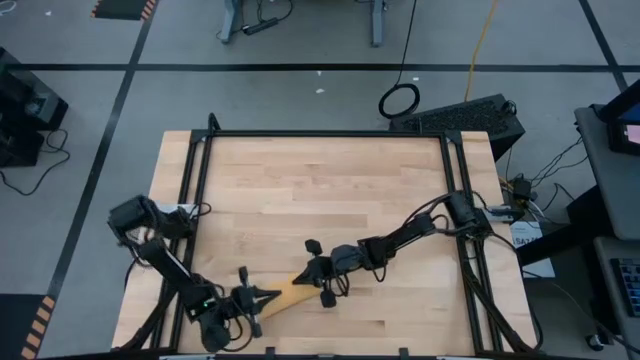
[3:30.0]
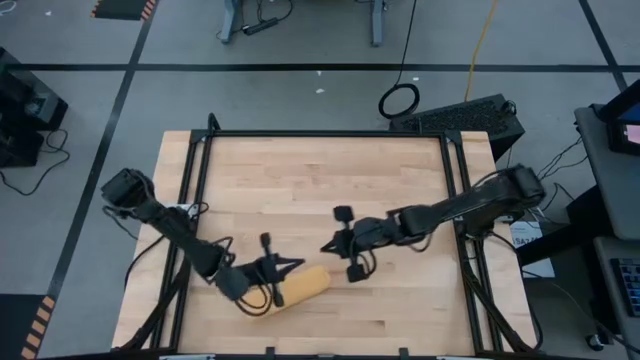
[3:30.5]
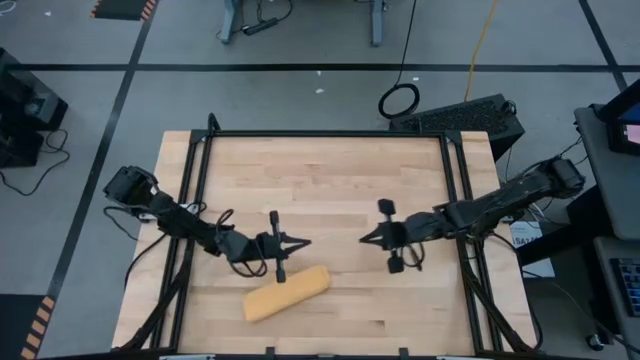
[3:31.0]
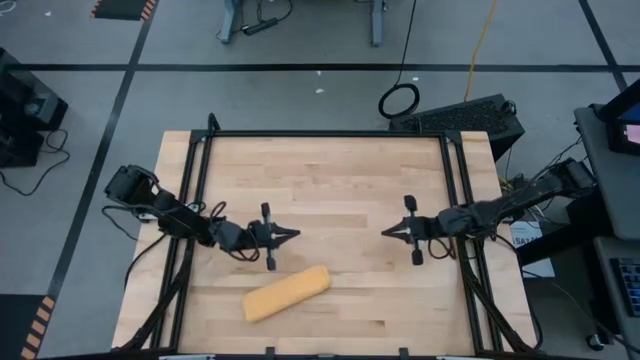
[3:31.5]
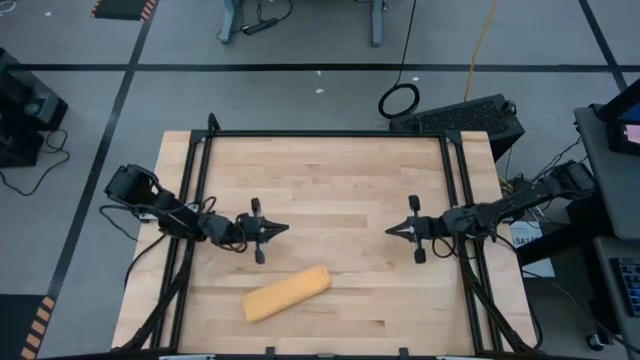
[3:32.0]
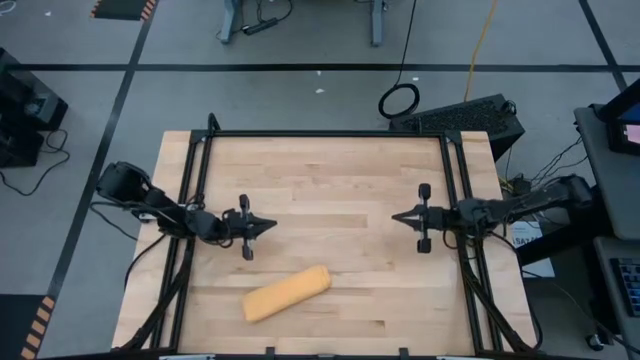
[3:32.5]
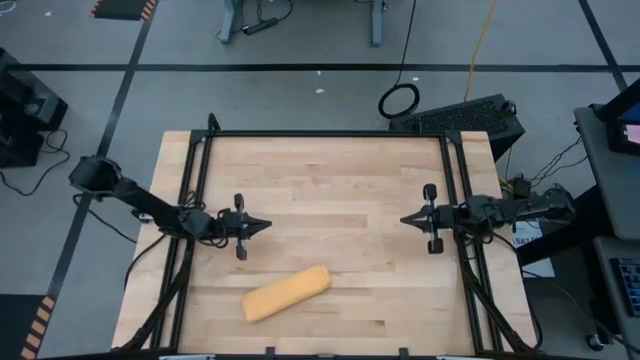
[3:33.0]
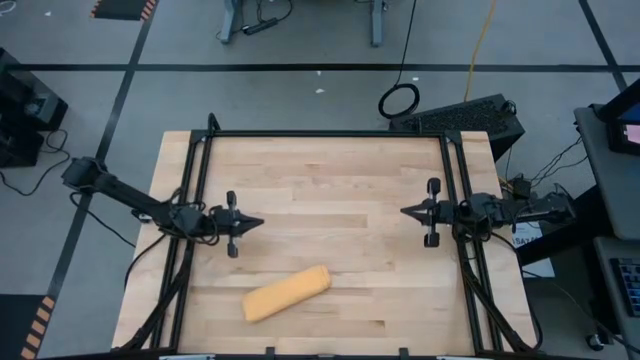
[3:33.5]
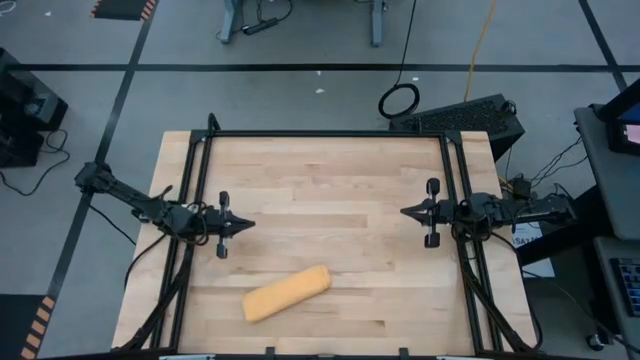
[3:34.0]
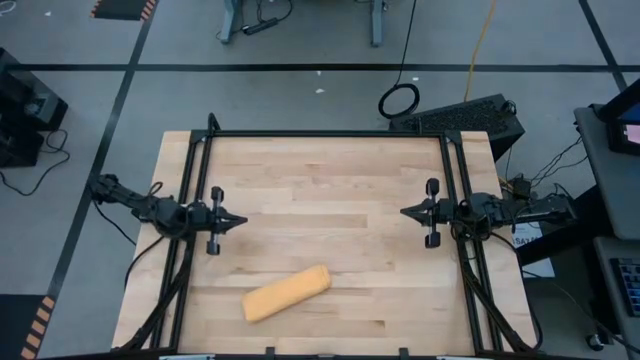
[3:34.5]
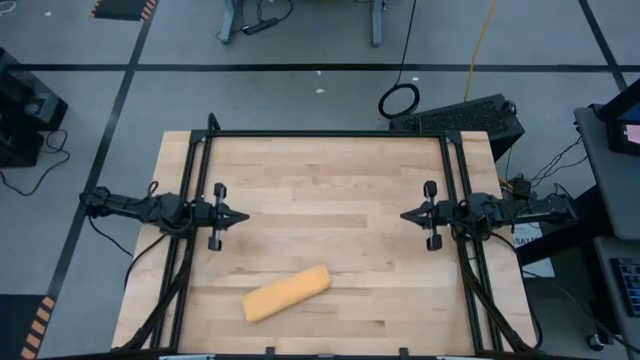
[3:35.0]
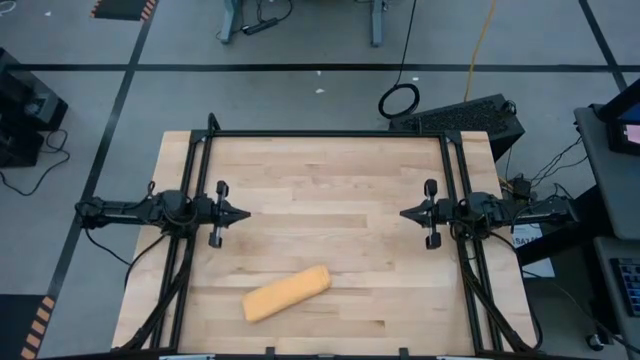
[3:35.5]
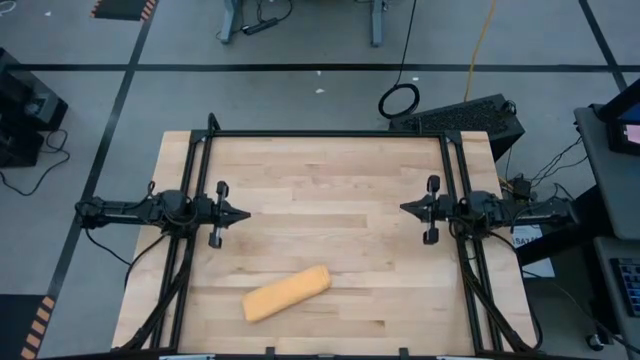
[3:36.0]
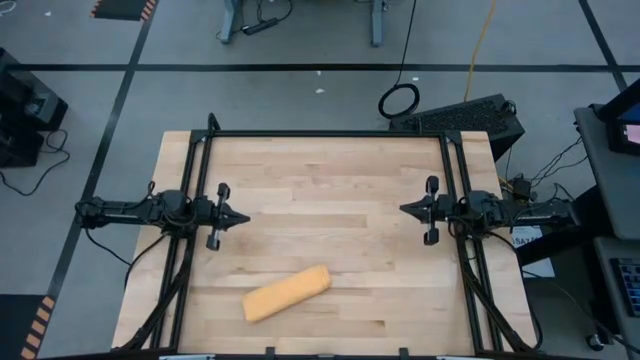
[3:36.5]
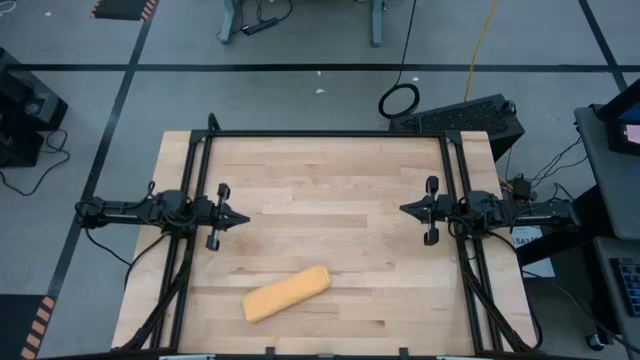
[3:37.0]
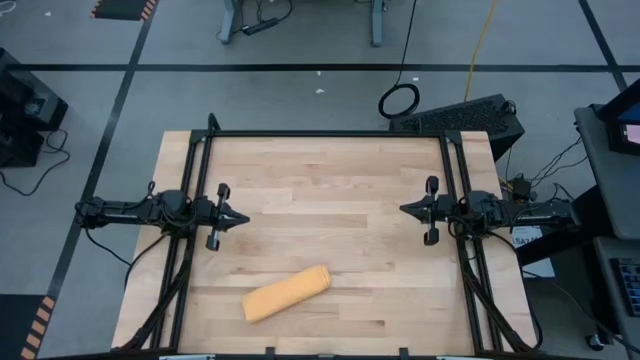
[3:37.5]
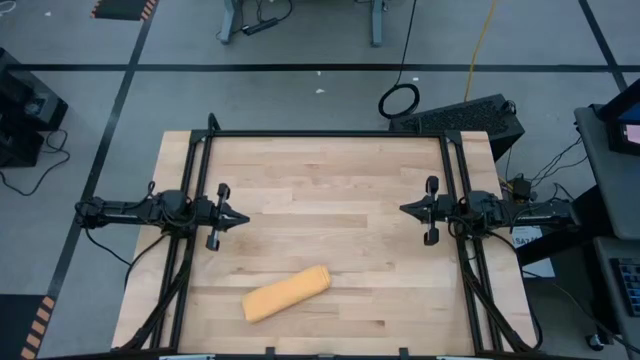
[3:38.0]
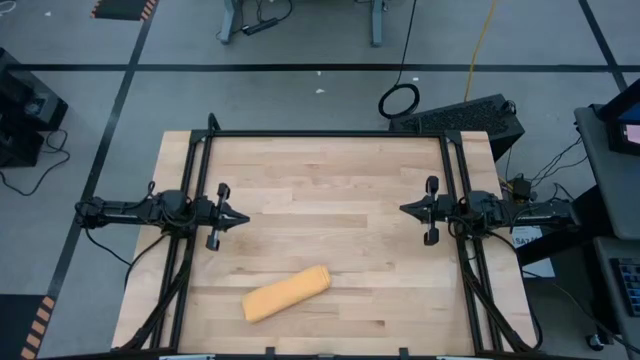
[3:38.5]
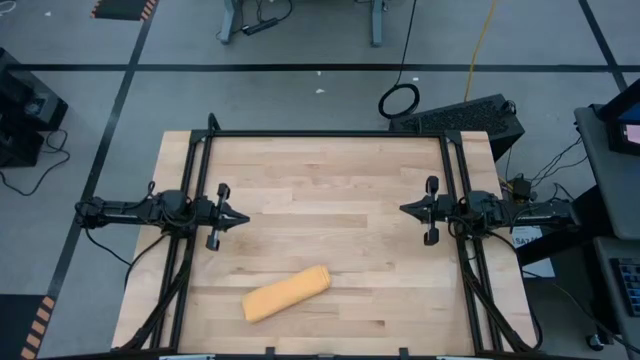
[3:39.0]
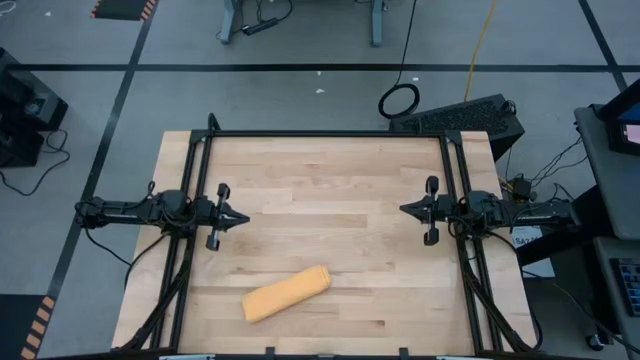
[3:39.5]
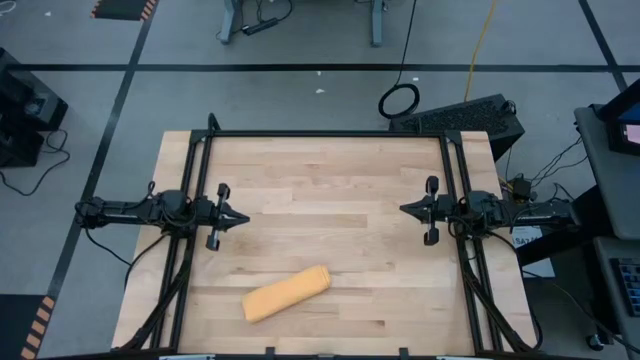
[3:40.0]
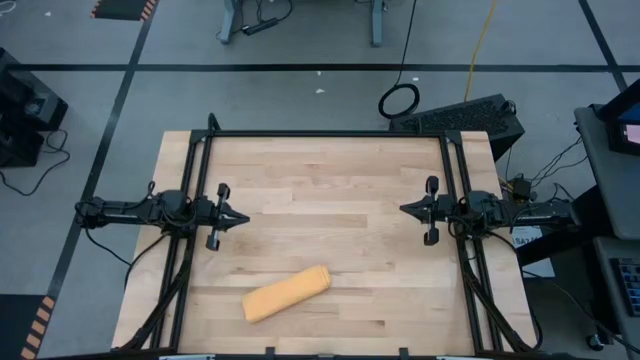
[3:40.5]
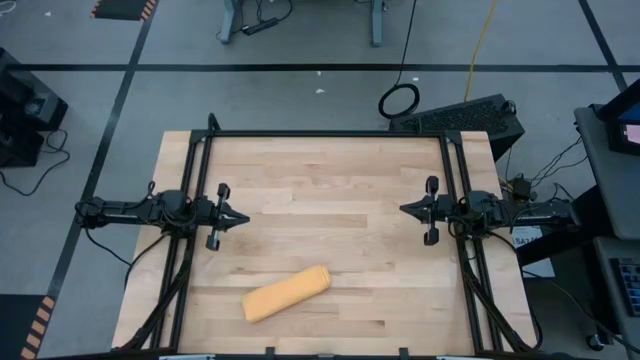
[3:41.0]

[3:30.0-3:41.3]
Task: Roll towel
Return to Home Position

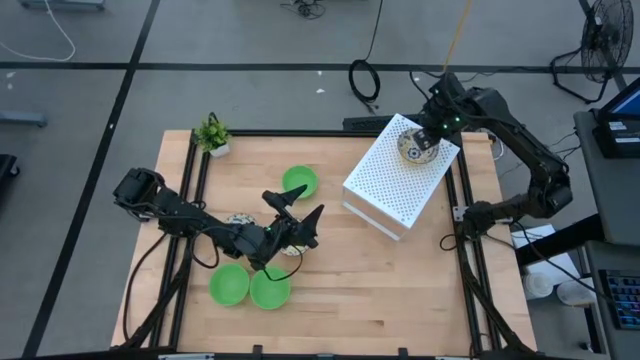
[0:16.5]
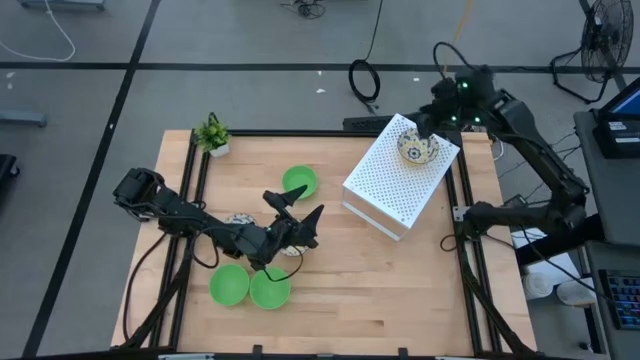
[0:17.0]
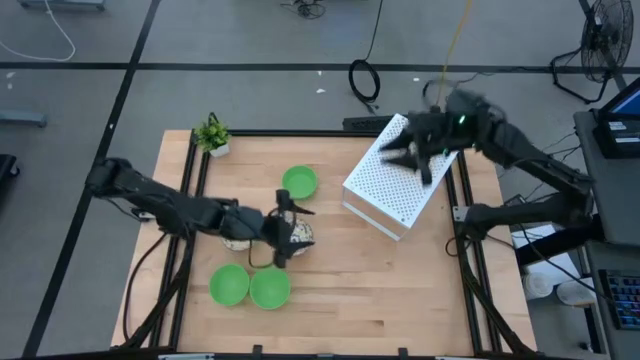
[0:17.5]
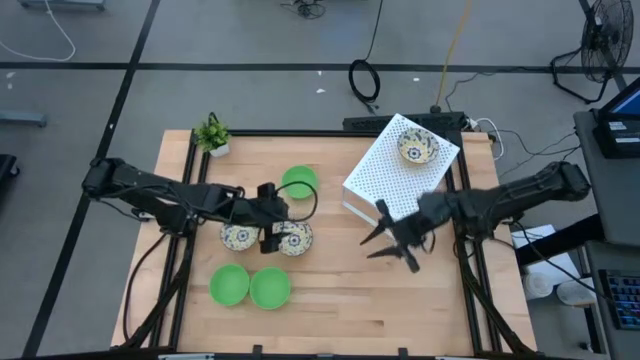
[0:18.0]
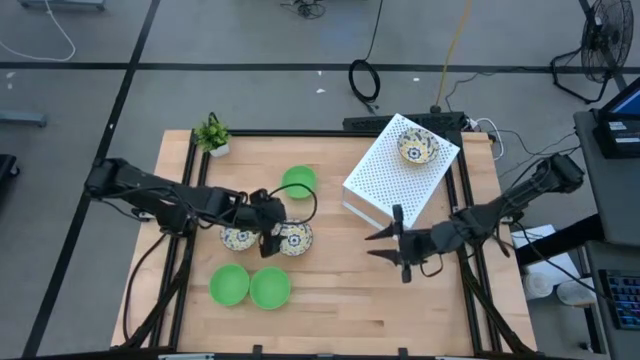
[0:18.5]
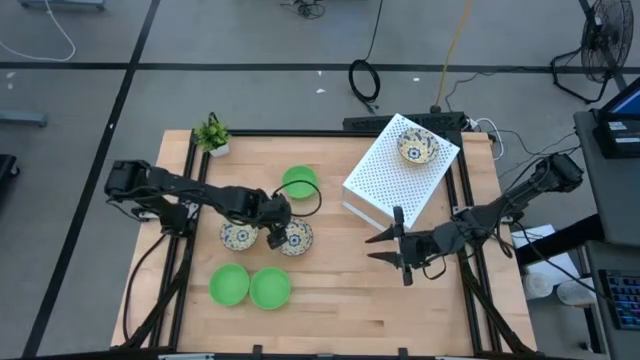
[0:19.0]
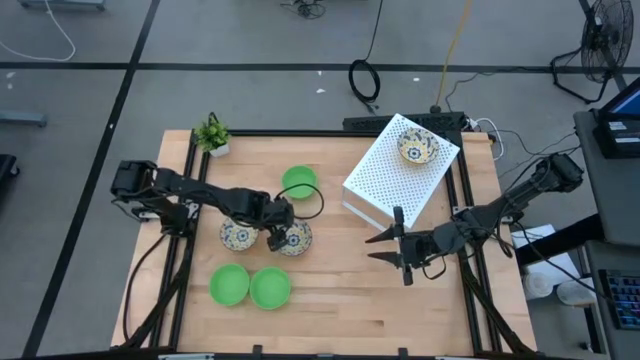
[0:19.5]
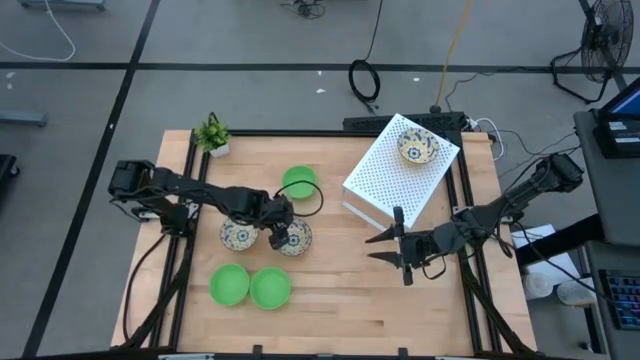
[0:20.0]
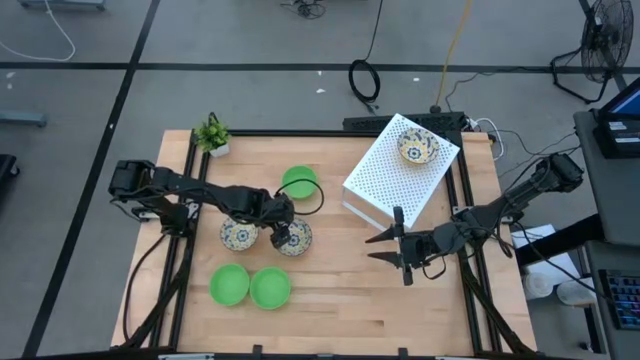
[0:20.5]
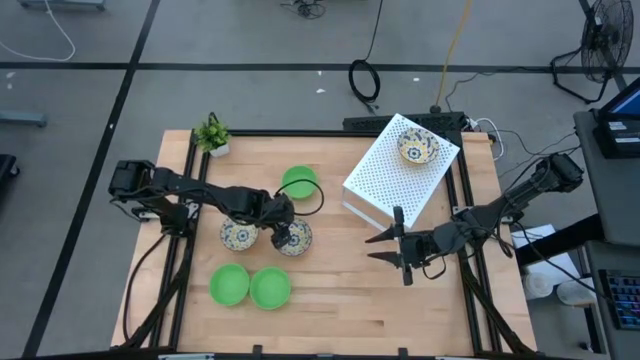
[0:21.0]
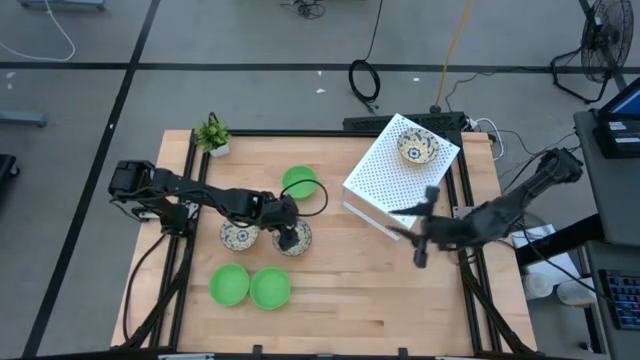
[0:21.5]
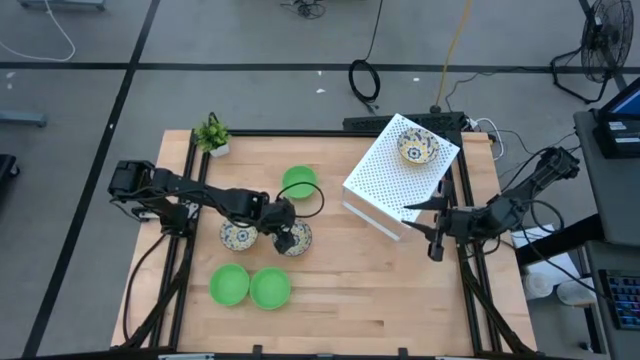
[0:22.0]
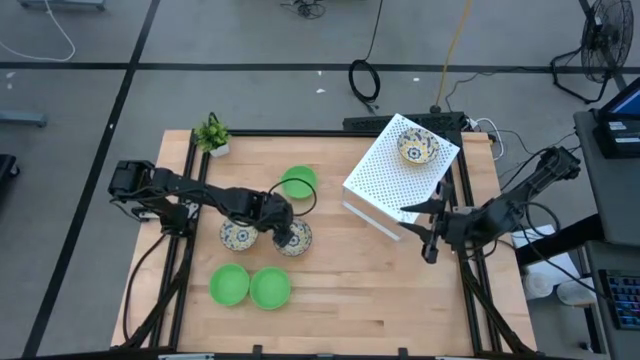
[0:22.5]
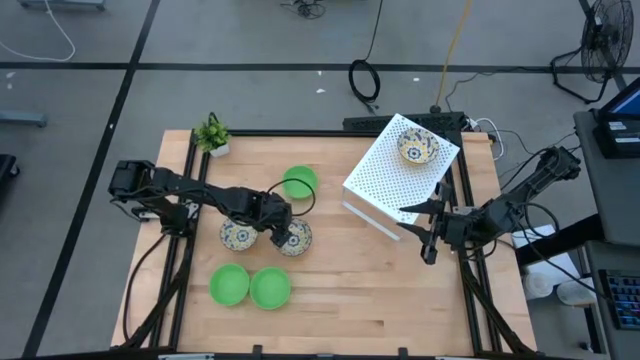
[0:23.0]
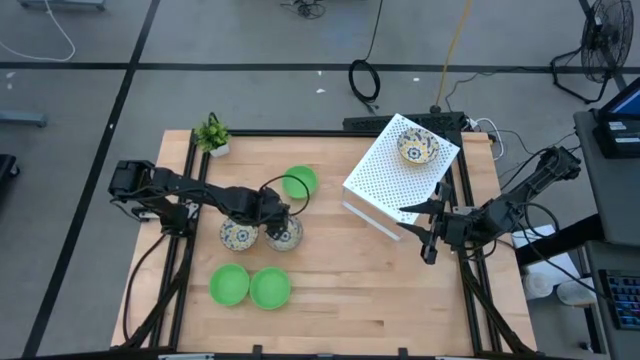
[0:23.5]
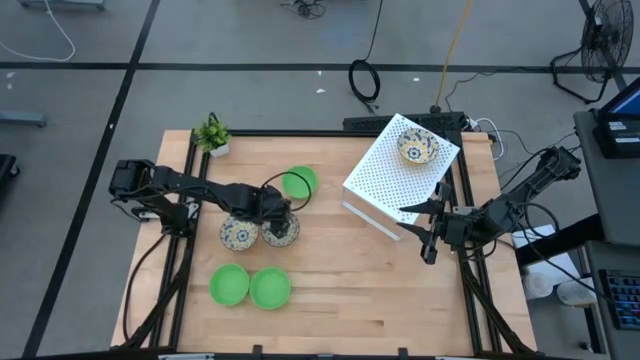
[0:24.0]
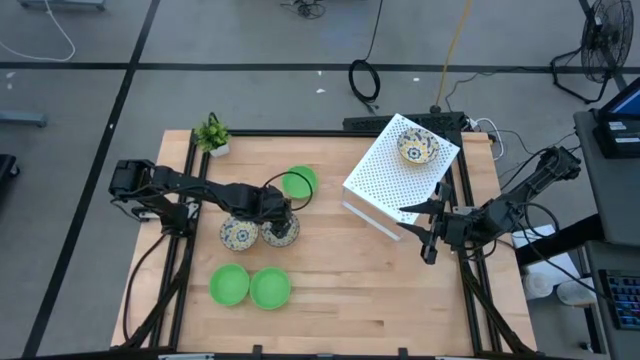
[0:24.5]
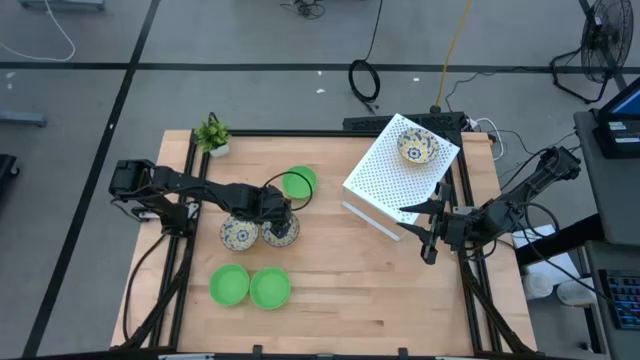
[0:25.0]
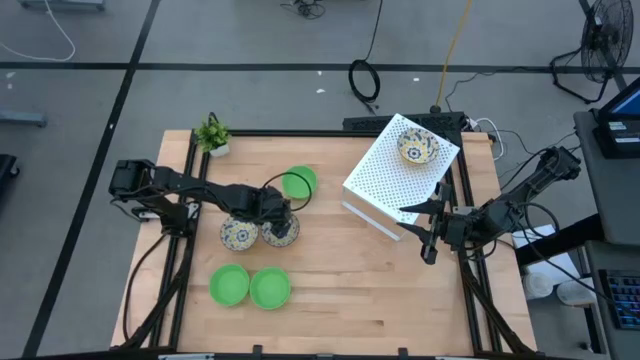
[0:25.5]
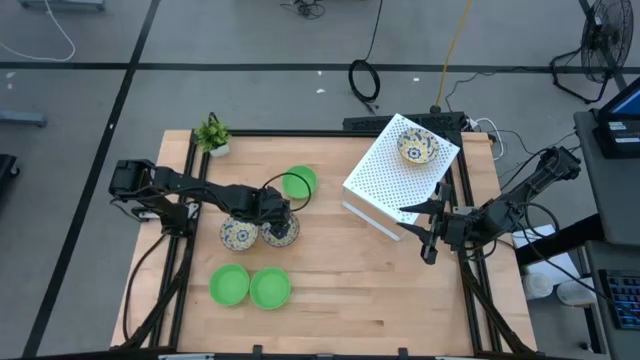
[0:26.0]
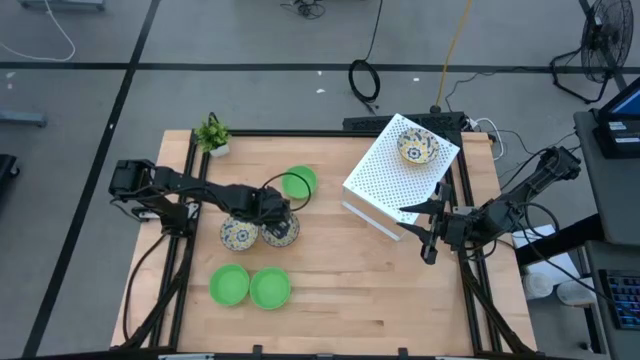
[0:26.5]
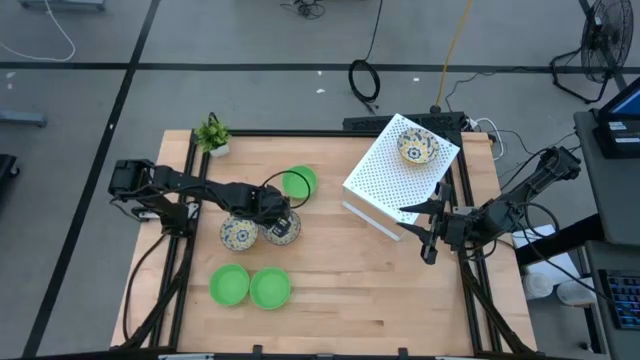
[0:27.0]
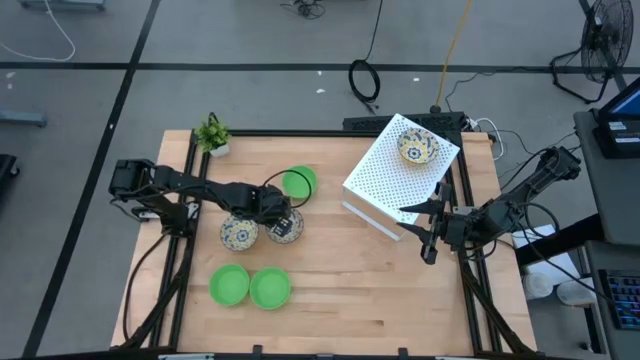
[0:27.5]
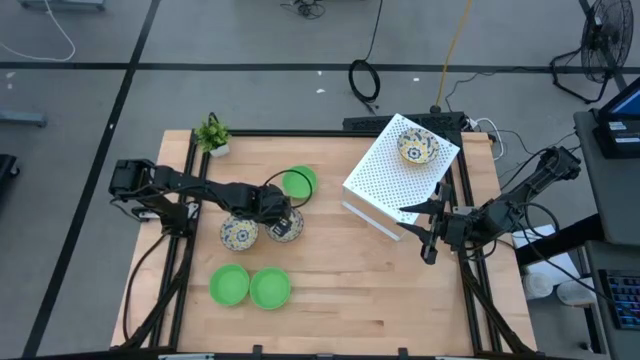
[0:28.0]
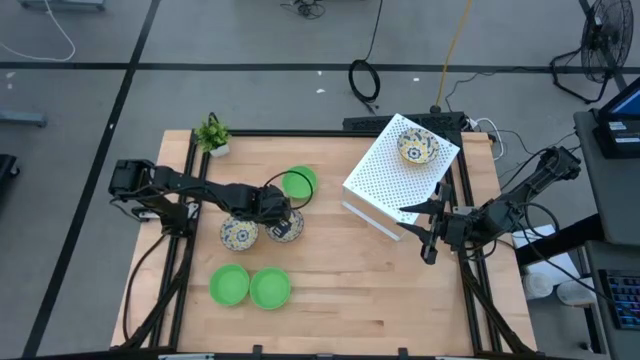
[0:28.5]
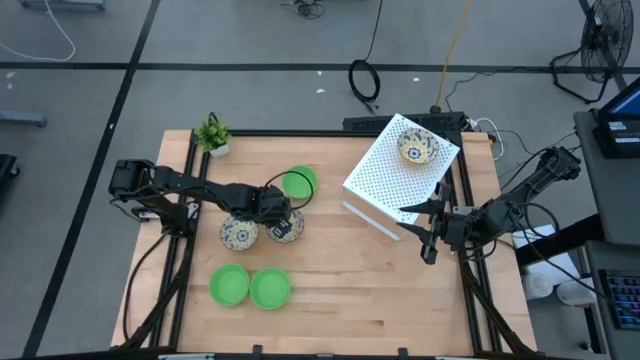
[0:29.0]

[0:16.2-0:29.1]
Task: Pick & Place Mini bowls
Stack the right yellow patterned bowl on top of the other yellow patterned bowl on the shelf
